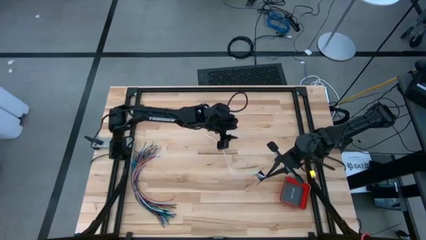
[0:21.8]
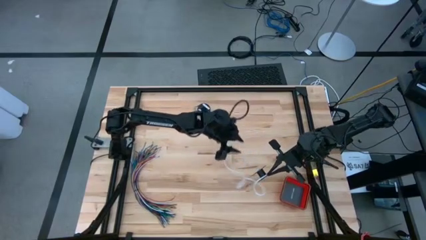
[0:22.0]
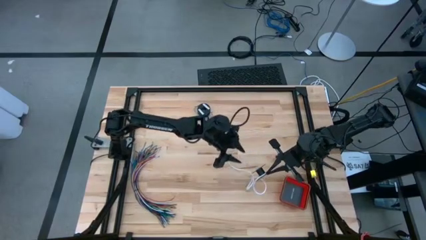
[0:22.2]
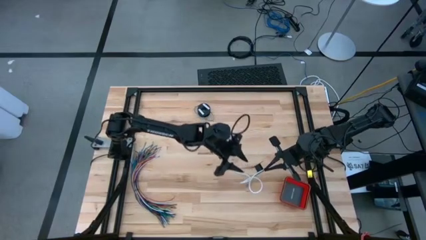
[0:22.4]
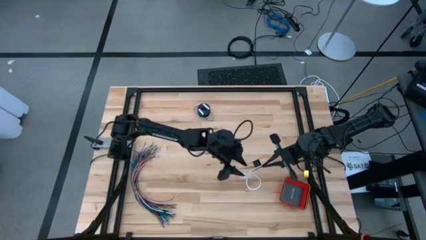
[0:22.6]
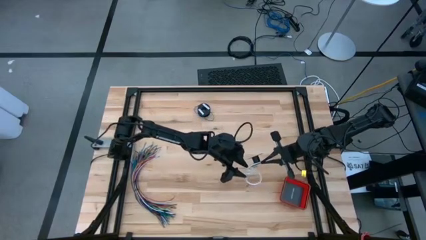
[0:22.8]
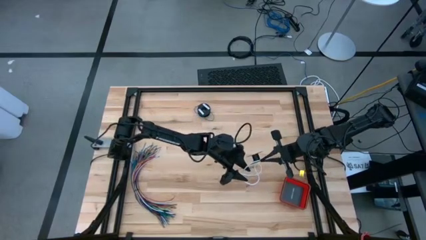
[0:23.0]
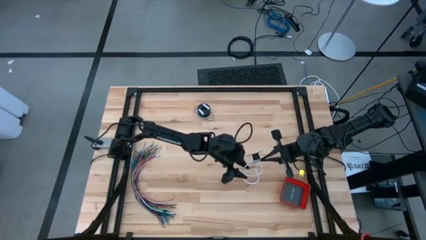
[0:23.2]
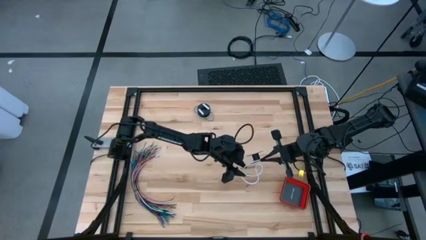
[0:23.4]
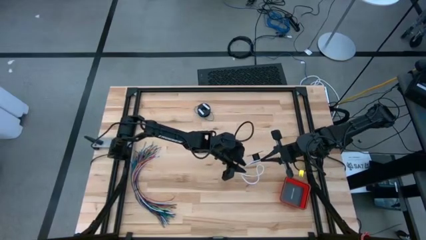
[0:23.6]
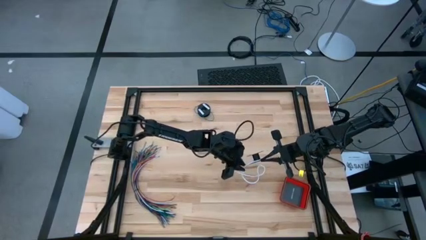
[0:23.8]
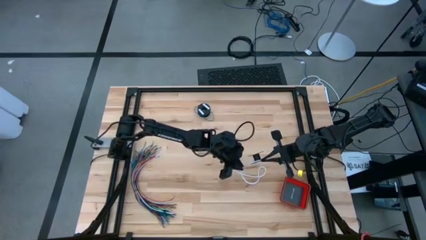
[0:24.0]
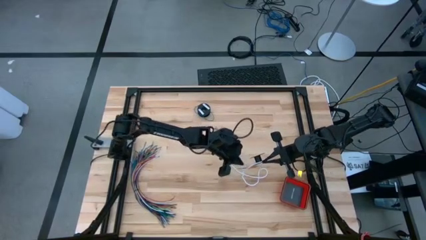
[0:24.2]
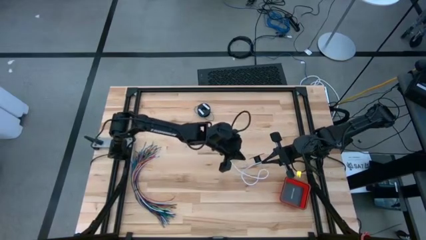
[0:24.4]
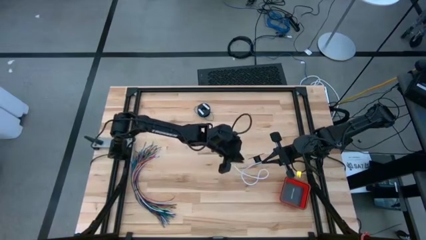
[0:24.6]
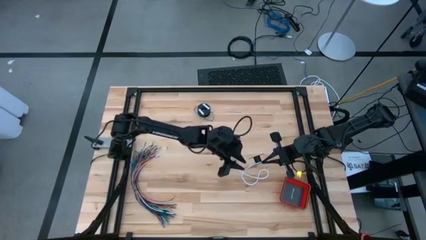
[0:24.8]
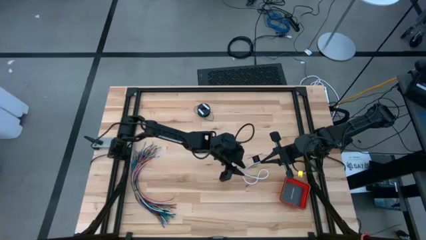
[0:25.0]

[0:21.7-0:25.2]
Task: Coil cords
Uncoil the white wire from the spool

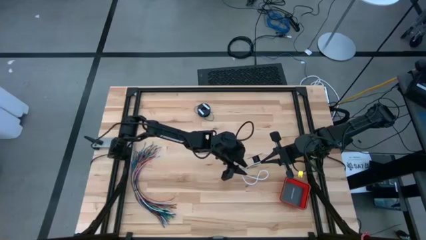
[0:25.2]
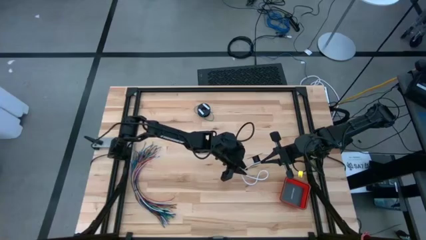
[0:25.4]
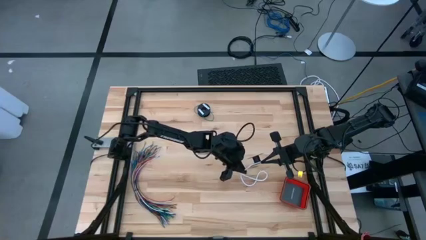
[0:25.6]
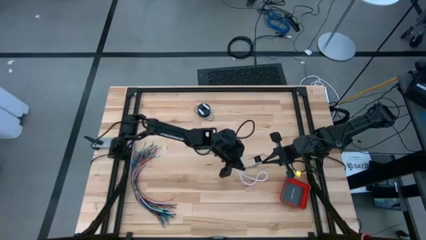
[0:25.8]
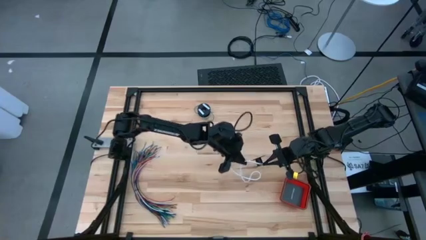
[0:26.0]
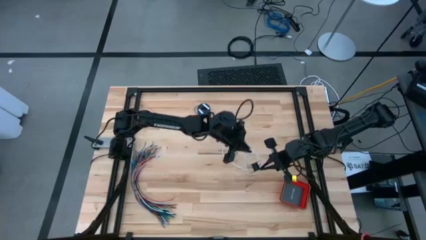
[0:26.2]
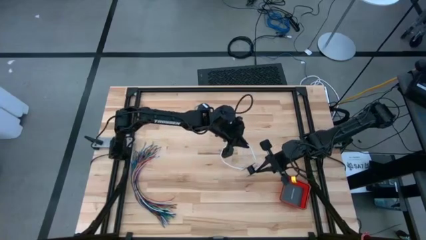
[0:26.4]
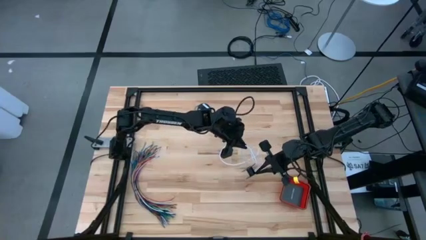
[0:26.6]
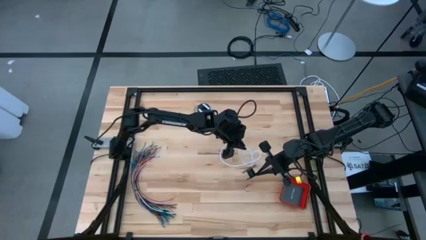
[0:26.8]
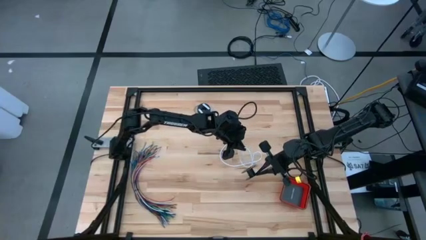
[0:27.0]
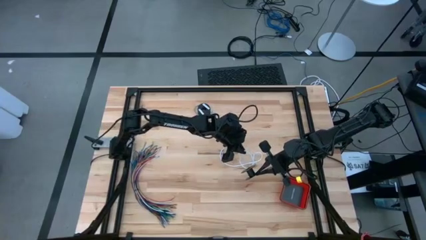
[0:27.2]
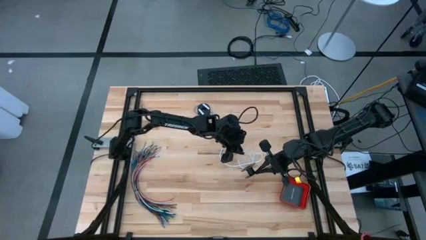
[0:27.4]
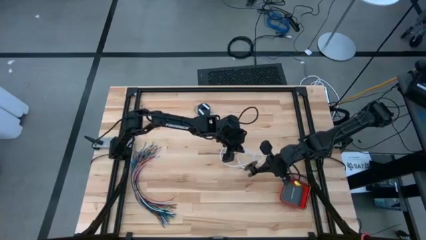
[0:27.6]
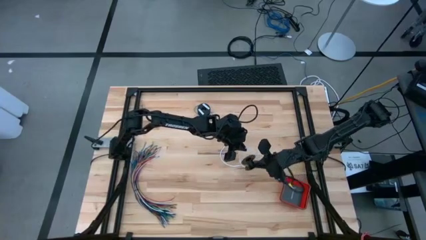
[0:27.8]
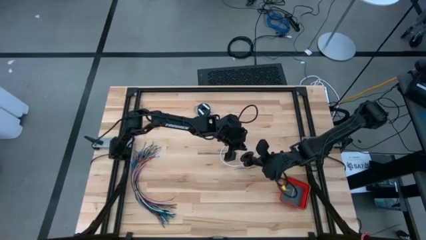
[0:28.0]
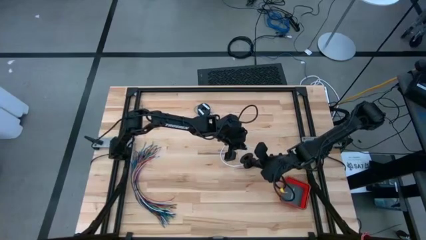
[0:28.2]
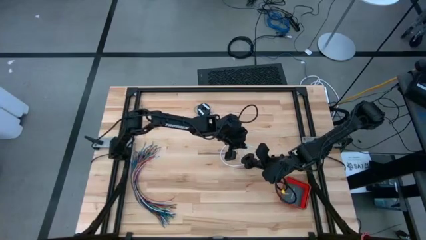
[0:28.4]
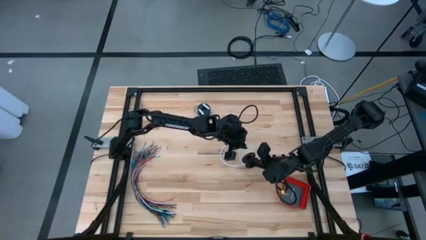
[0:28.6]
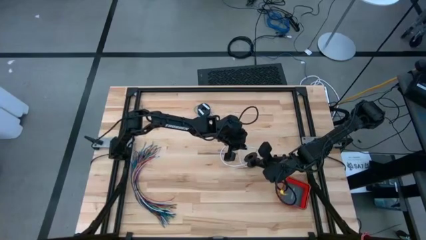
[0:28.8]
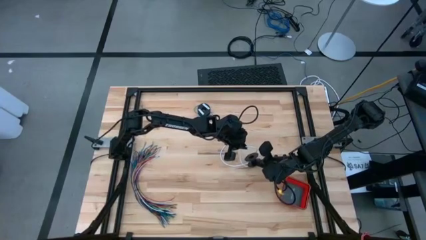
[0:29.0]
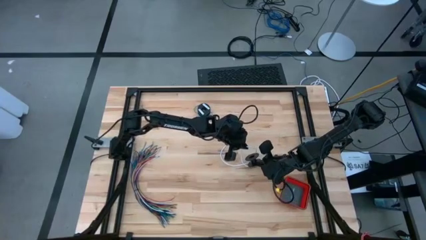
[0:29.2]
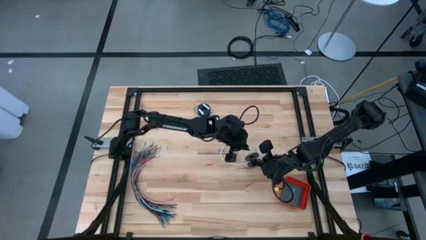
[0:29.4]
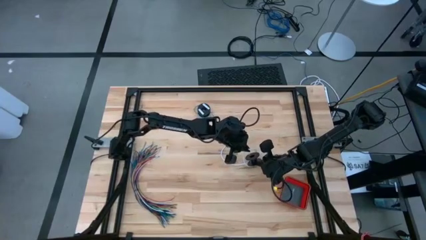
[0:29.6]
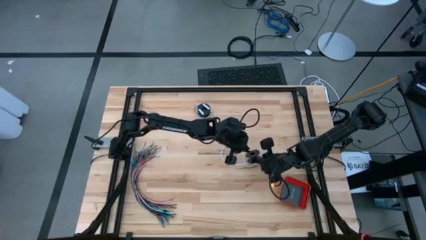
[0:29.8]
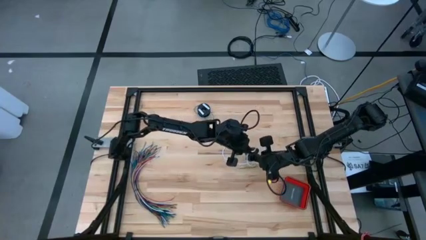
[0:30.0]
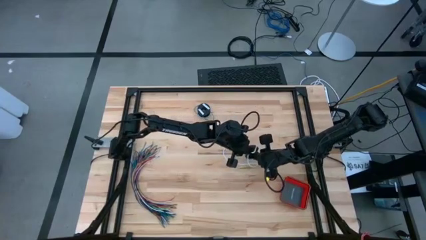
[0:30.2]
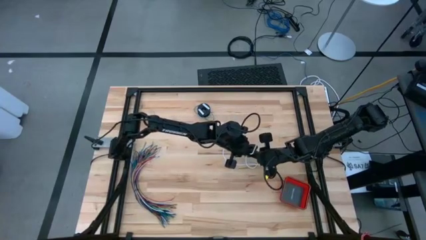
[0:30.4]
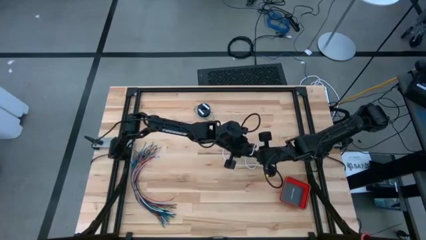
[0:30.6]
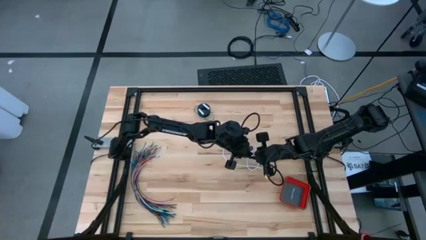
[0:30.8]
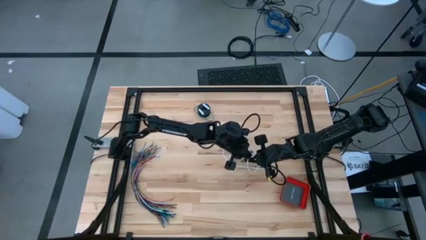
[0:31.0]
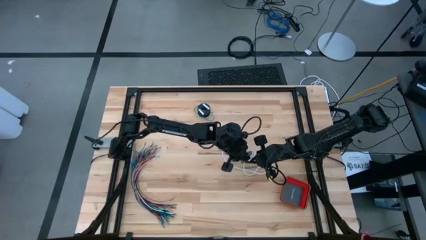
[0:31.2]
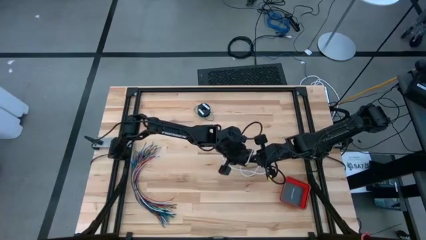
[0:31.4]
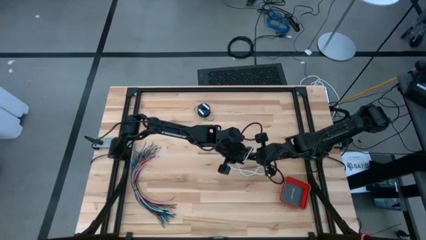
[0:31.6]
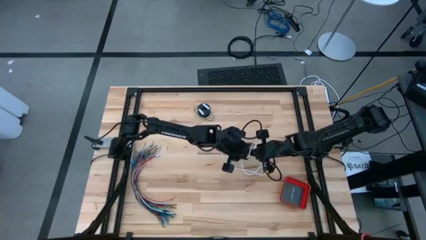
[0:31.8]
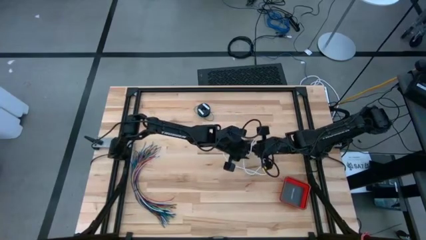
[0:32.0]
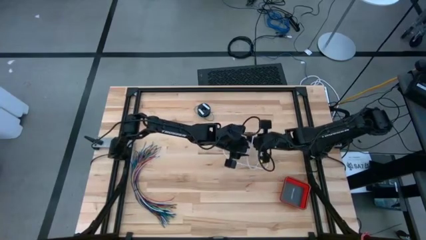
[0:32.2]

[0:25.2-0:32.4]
Uncoil the white wire from the spool

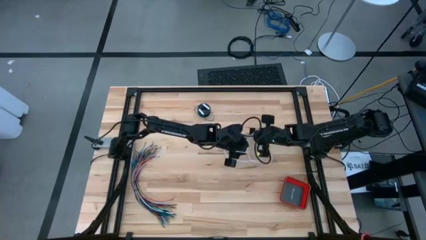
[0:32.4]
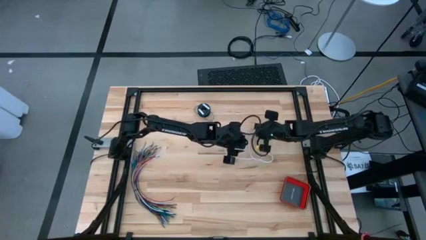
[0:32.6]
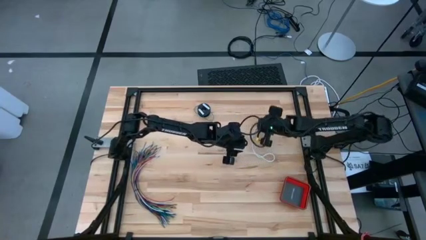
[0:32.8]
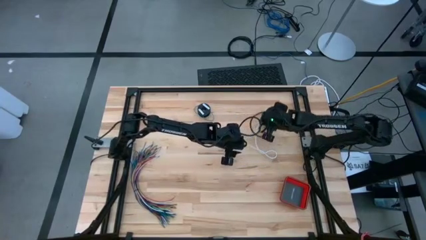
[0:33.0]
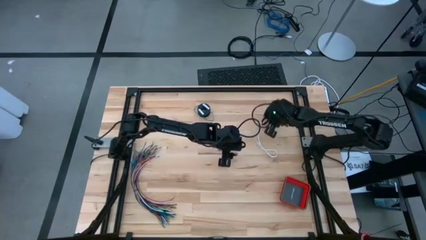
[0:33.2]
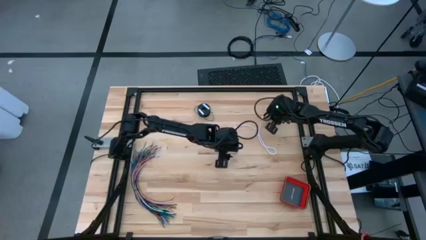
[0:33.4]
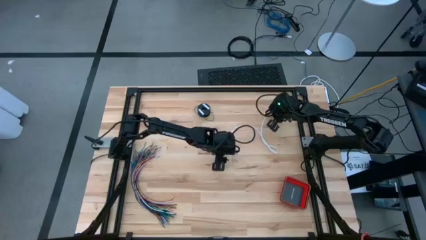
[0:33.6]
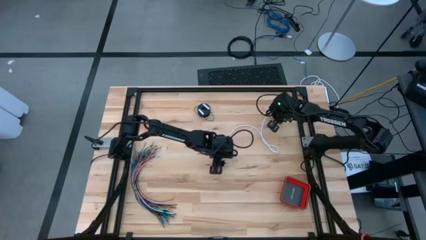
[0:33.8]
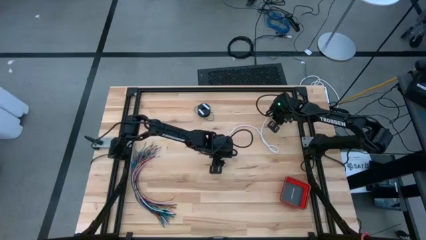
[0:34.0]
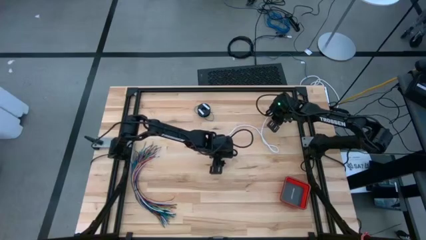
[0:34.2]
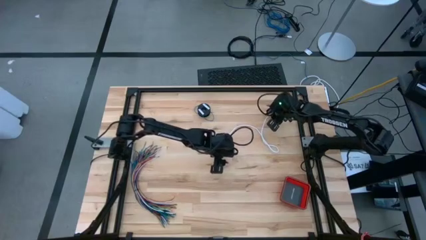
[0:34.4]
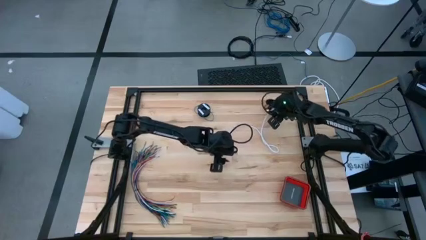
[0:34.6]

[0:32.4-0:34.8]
Put the white wire and the spool on the table

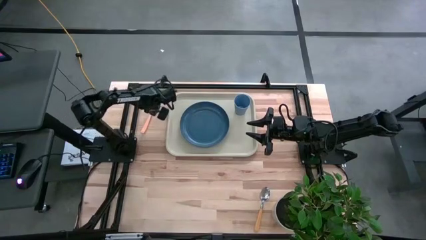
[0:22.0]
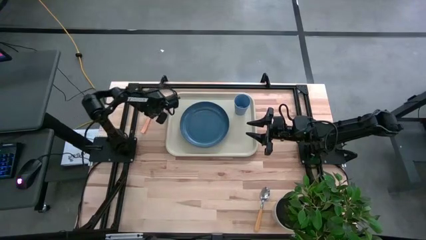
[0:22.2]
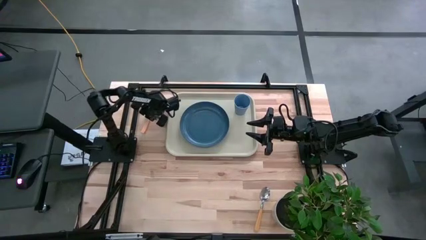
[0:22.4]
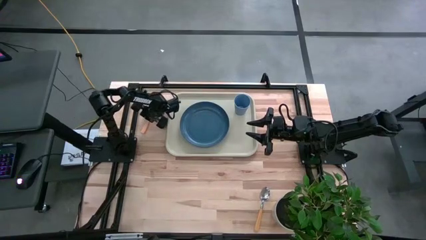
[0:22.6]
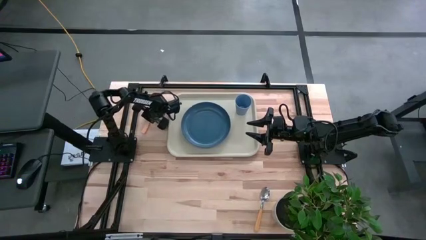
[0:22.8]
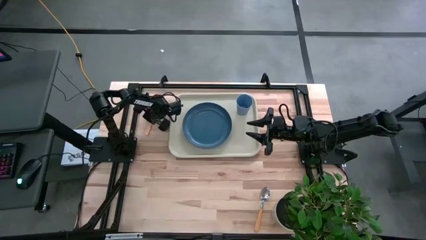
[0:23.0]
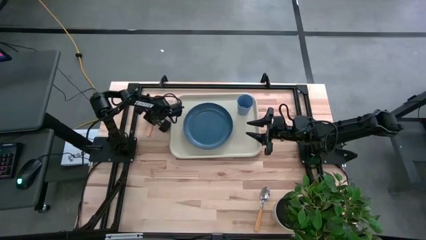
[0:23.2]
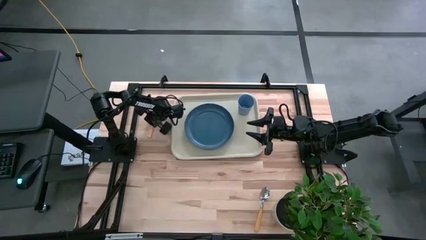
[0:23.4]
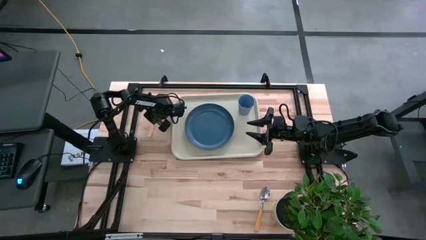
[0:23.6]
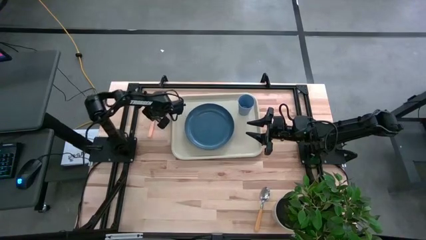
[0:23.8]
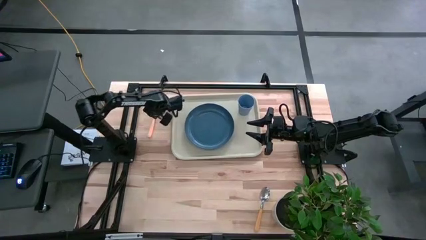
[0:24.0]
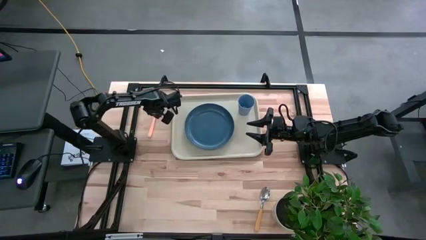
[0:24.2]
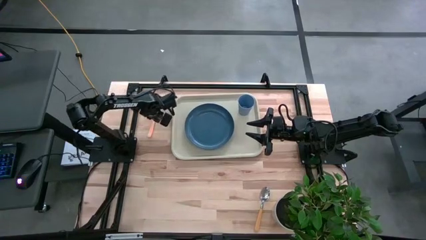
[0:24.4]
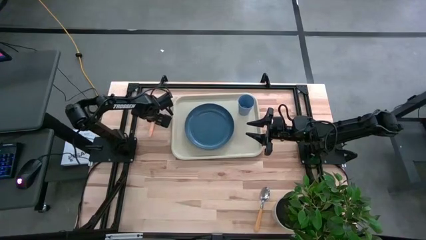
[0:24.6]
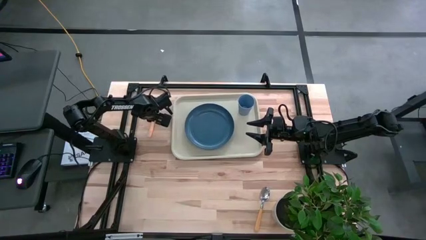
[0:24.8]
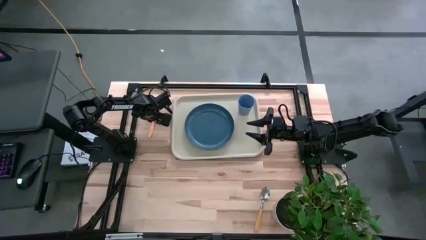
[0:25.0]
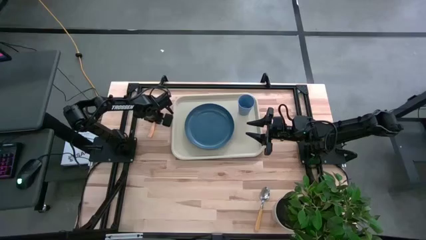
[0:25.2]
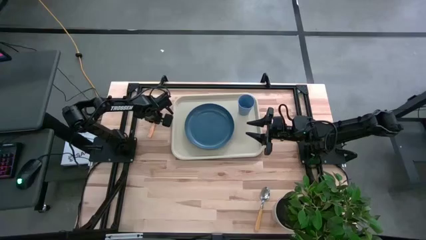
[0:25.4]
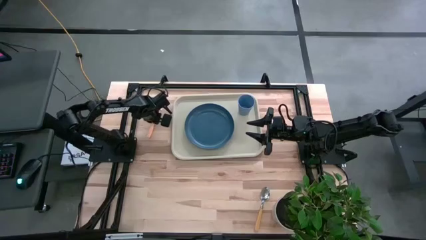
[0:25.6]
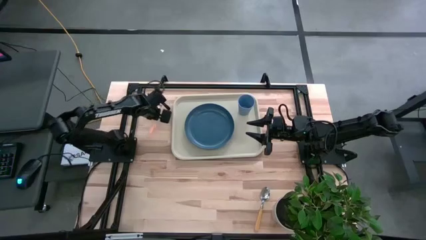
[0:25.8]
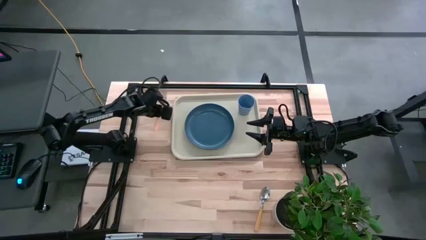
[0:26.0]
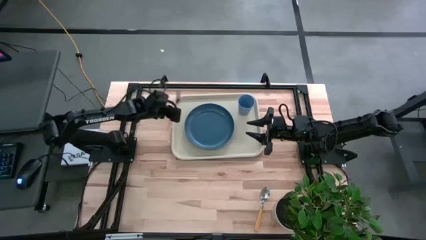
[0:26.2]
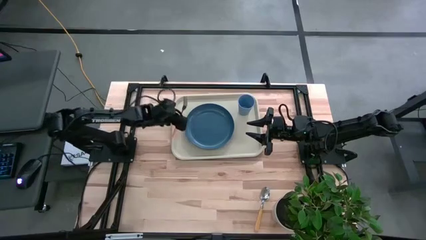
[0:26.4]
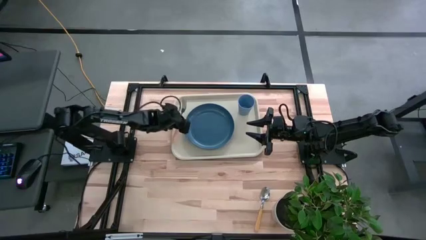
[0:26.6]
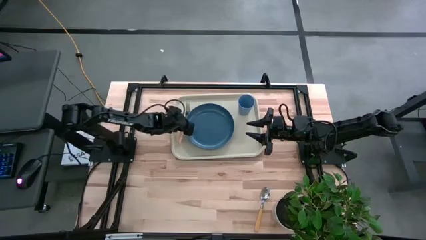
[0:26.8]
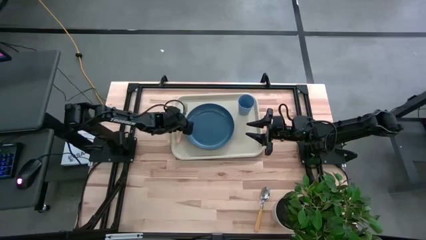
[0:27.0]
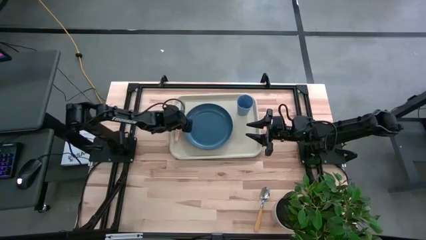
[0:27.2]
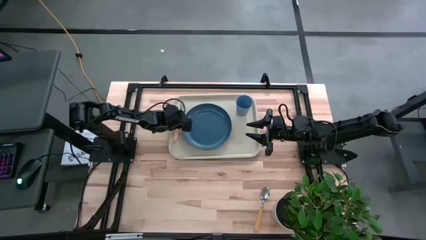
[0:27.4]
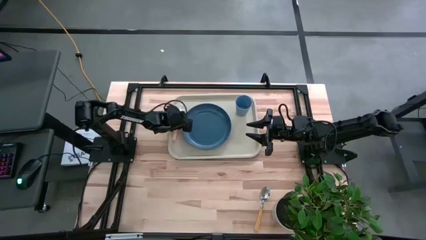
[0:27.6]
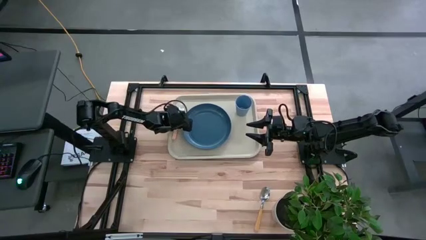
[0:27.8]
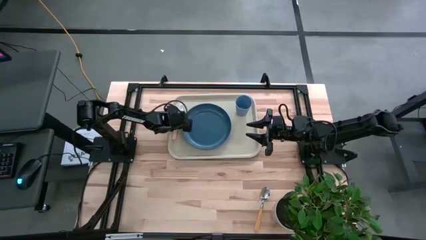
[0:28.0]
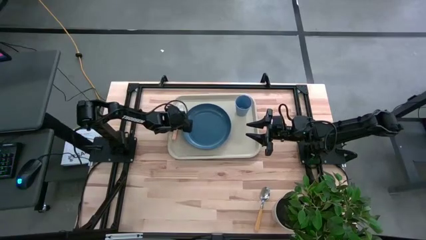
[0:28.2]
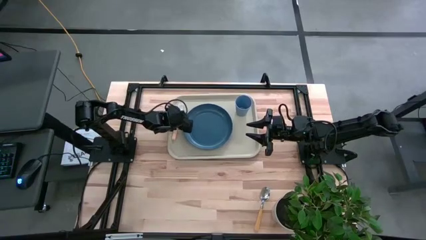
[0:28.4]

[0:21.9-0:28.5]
Task: Pick and place plate/cup/fork/spoon on tray
Put the orange fork on the white tray at the left of the blue plate
